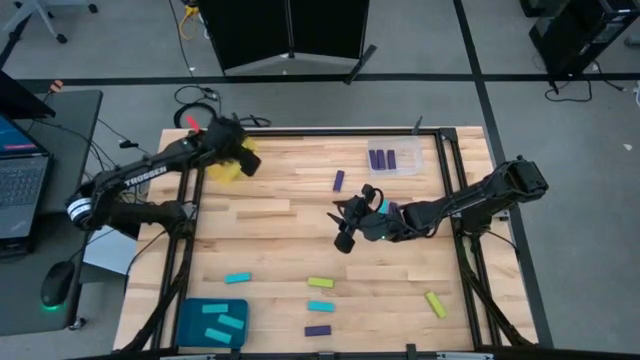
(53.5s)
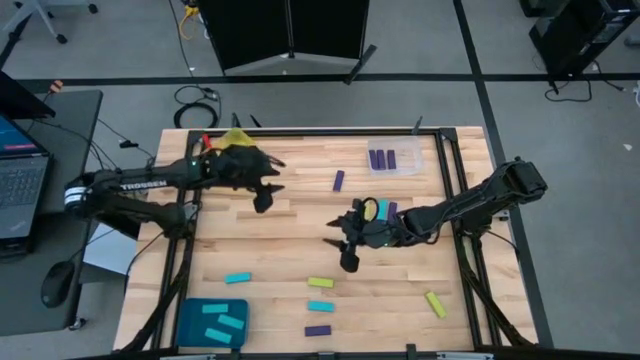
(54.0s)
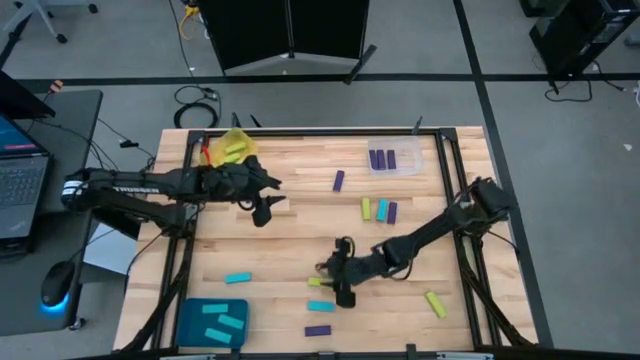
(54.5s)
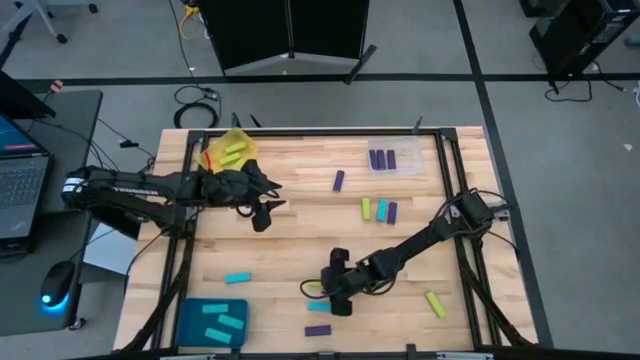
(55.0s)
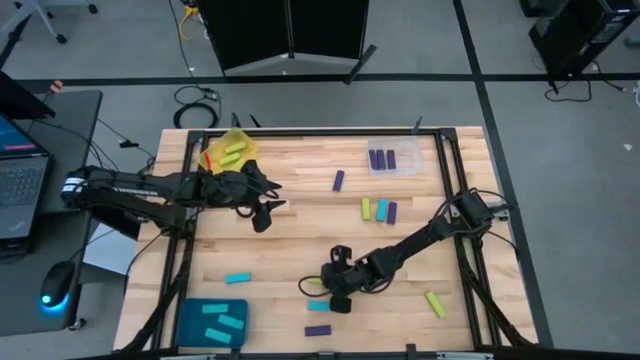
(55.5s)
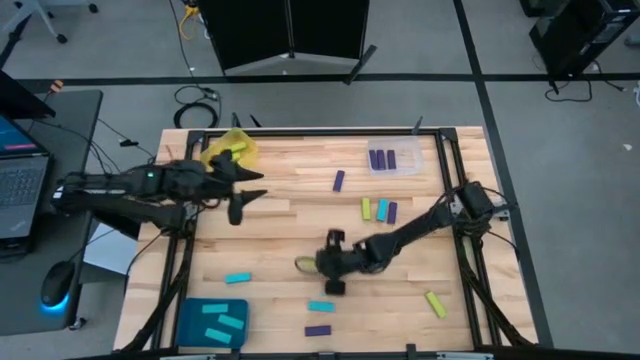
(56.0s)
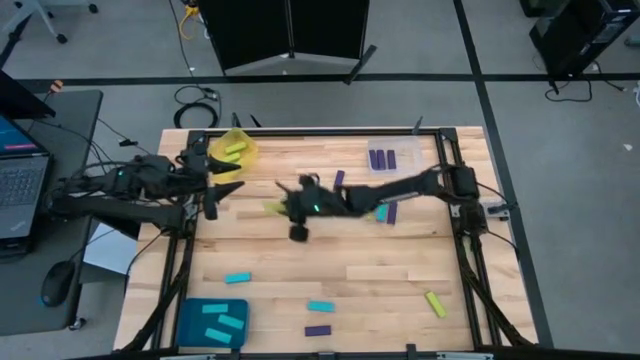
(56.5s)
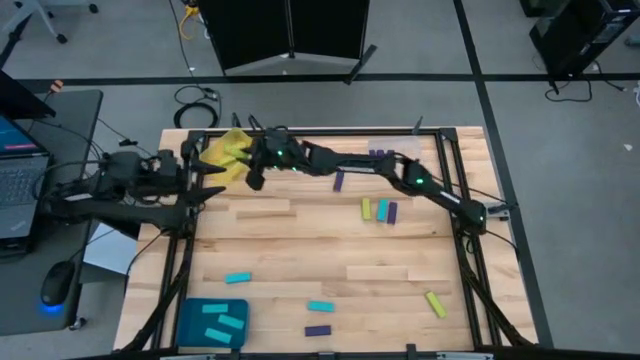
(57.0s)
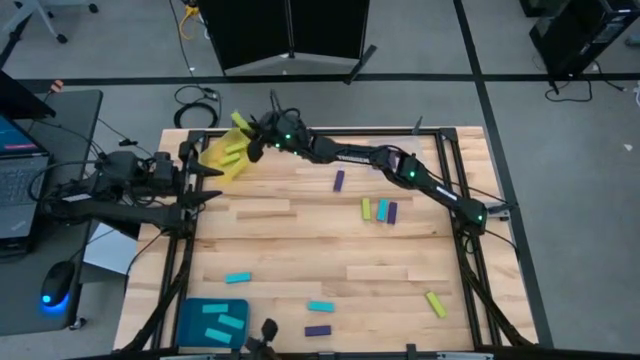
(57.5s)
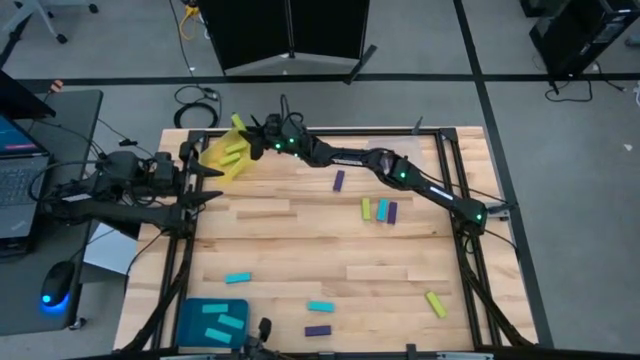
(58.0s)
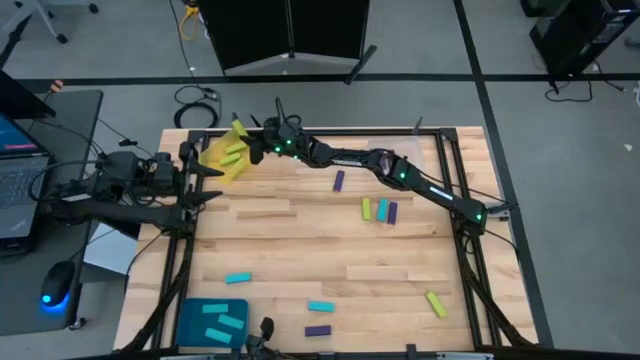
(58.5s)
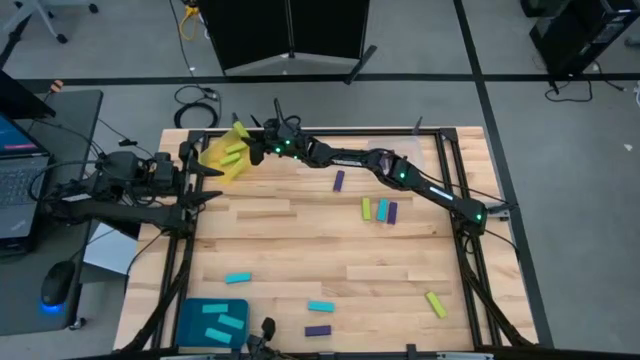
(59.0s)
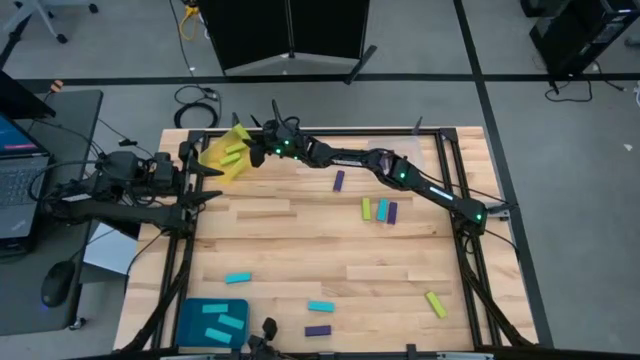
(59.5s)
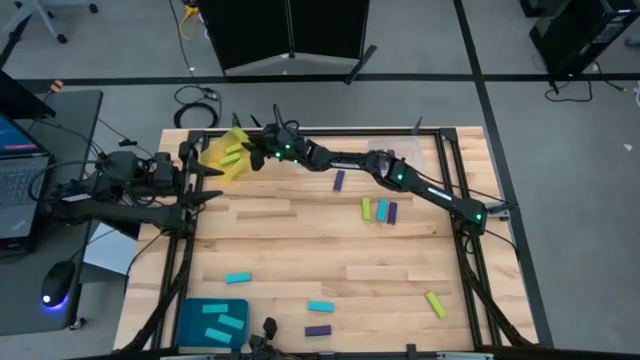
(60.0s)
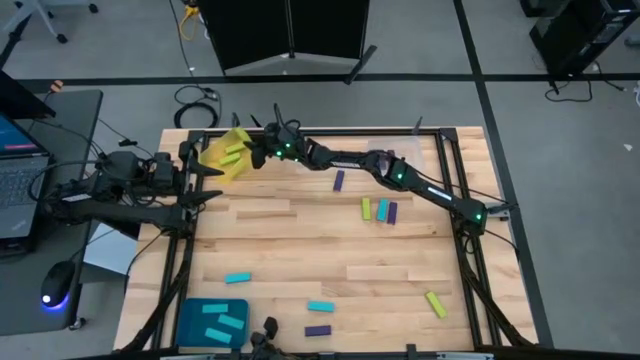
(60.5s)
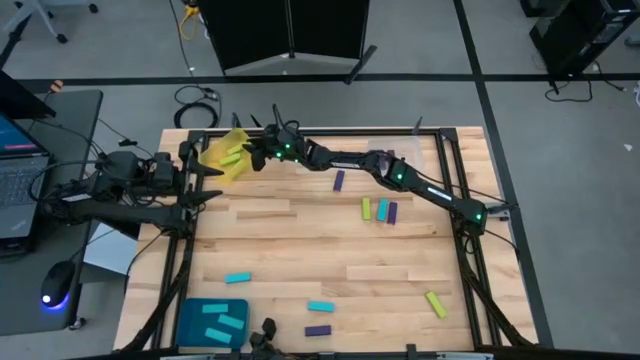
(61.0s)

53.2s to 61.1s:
Task: Sort blocks
Put the light green block into the yellow transparent bin

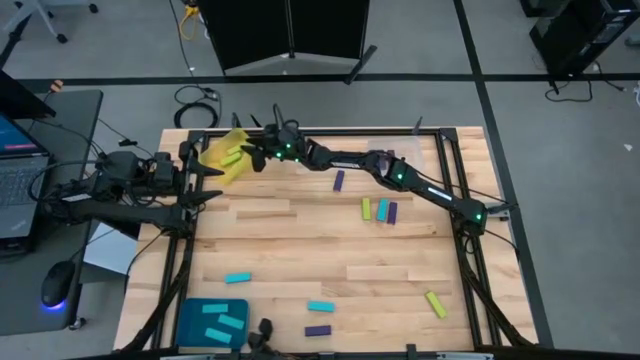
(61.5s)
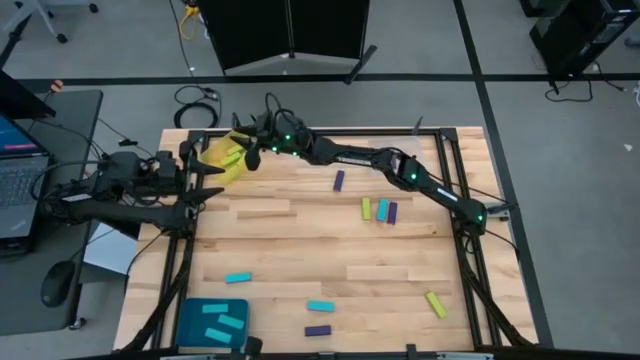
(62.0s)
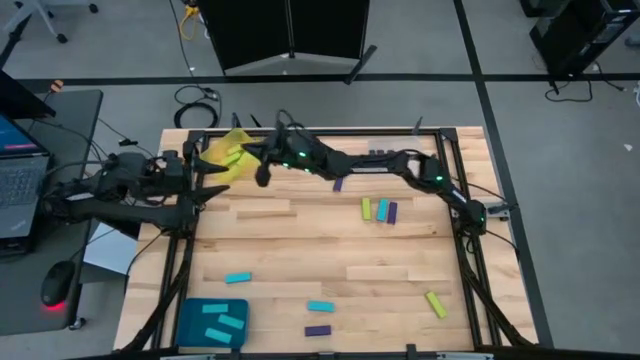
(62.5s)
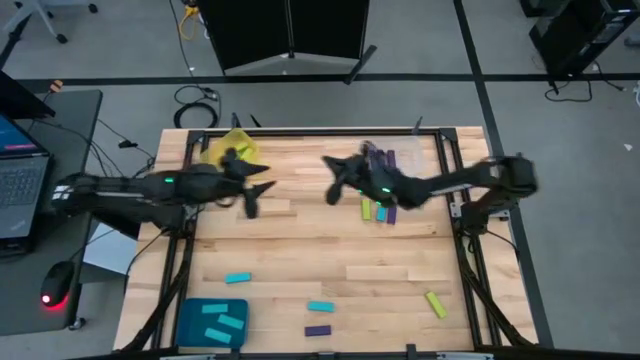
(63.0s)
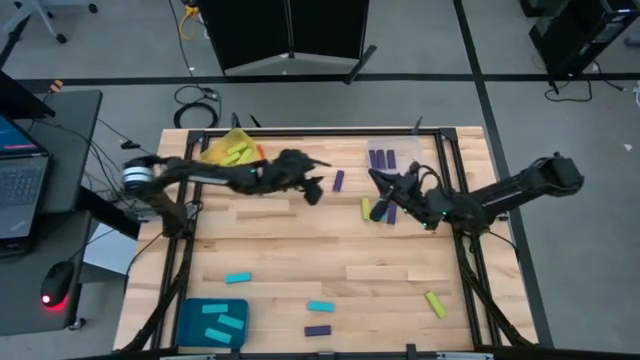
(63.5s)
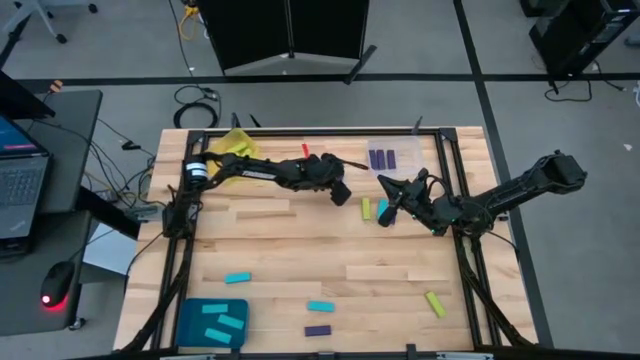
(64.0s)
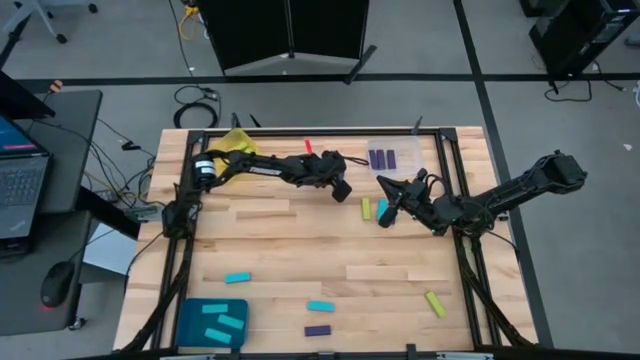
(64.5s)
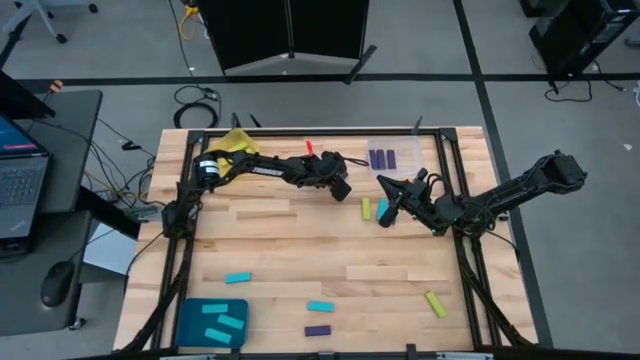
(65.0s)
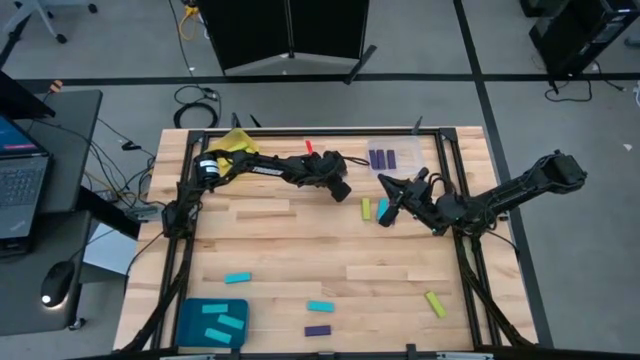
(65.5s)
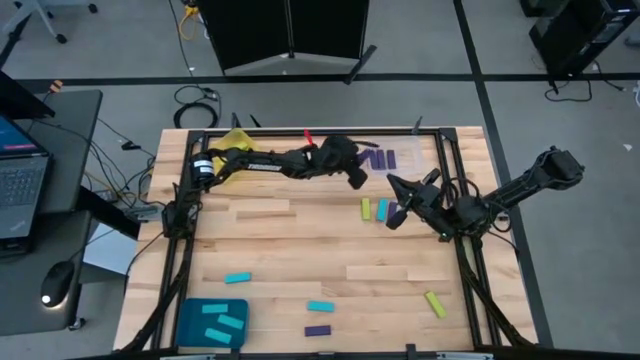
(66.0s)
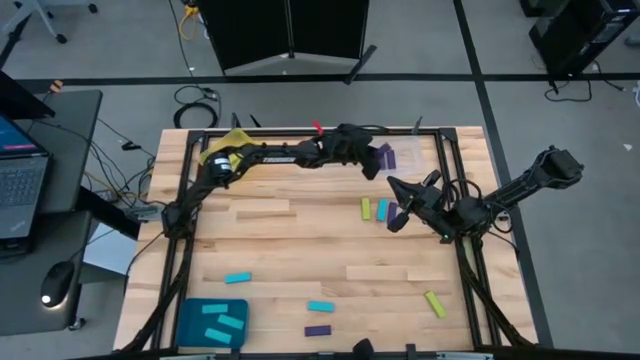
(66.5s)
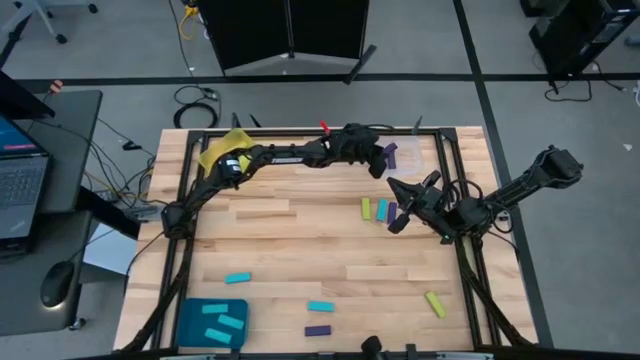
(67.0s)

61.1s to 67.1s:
Put the purple block into the white transparent bin

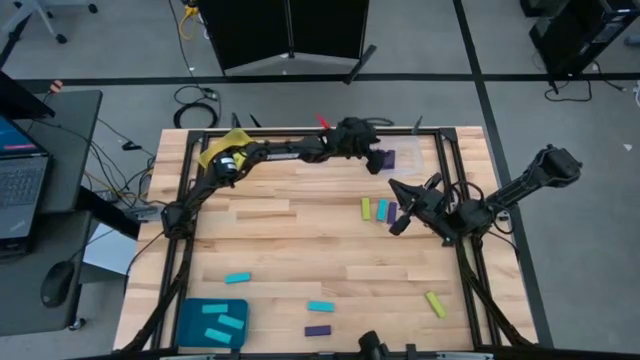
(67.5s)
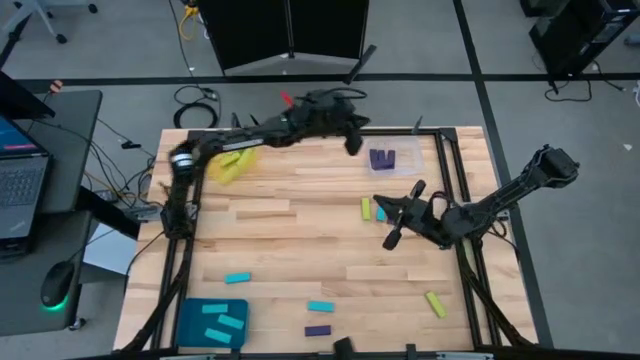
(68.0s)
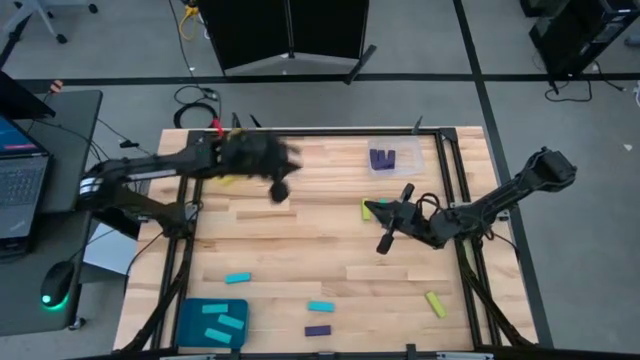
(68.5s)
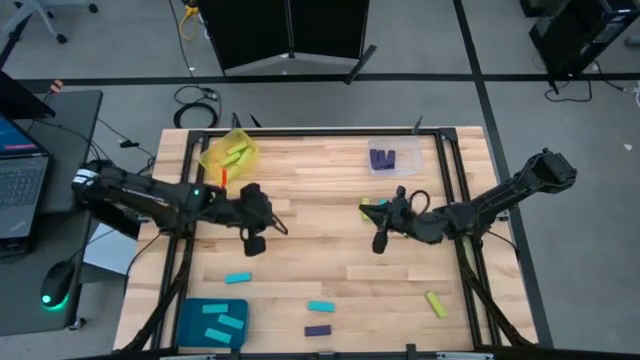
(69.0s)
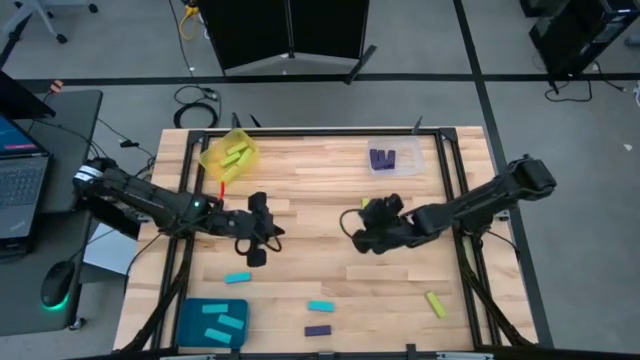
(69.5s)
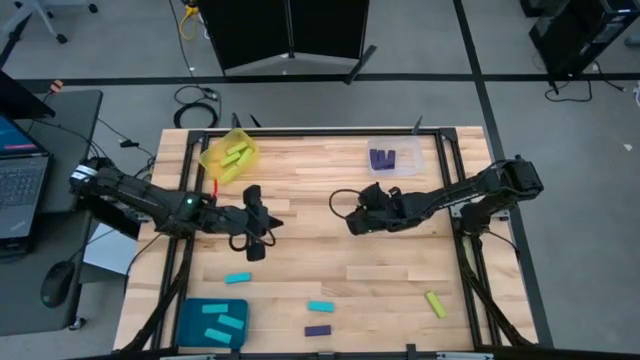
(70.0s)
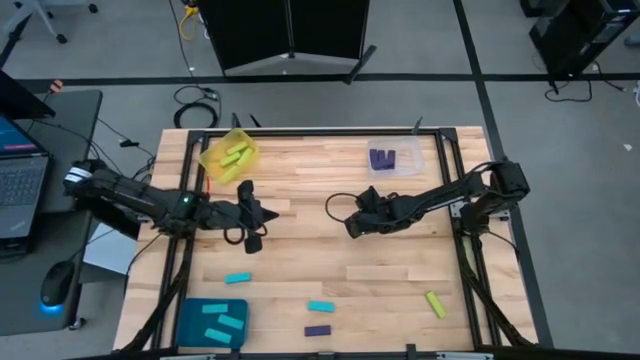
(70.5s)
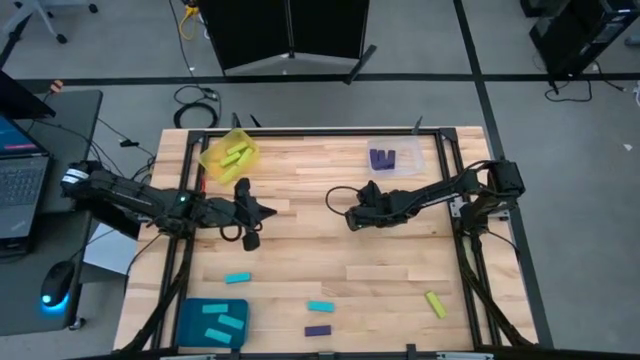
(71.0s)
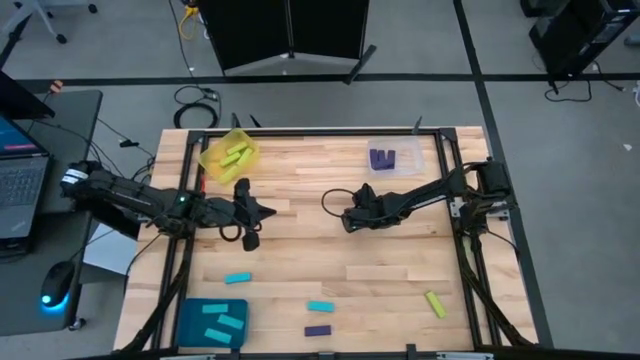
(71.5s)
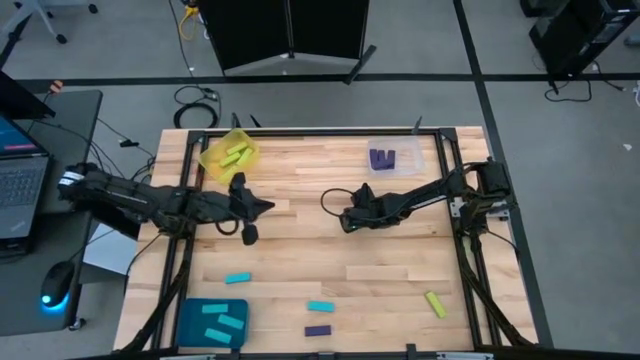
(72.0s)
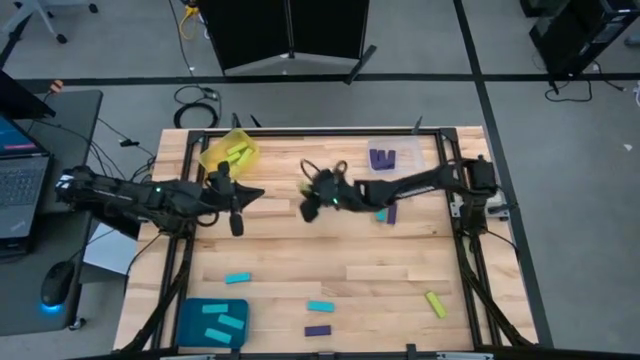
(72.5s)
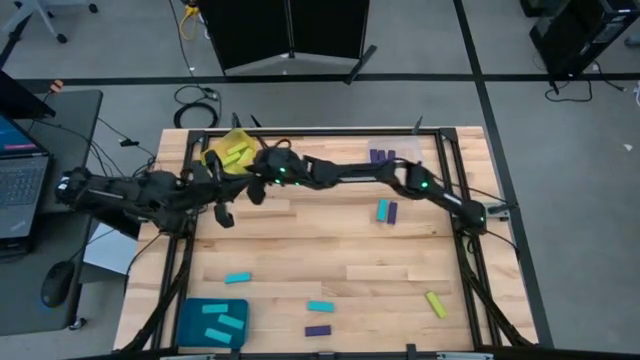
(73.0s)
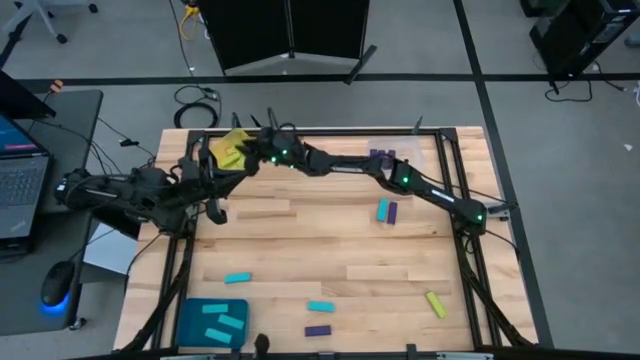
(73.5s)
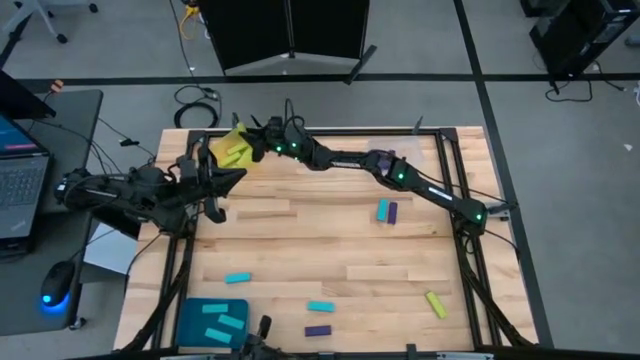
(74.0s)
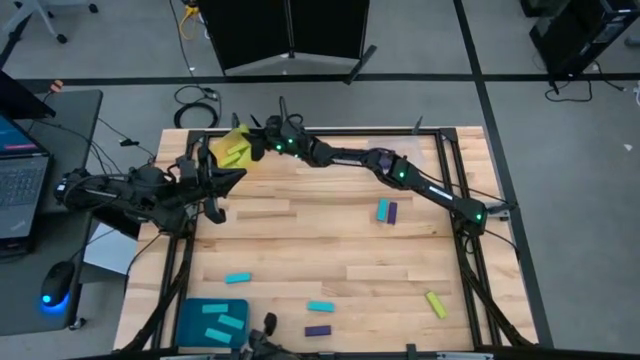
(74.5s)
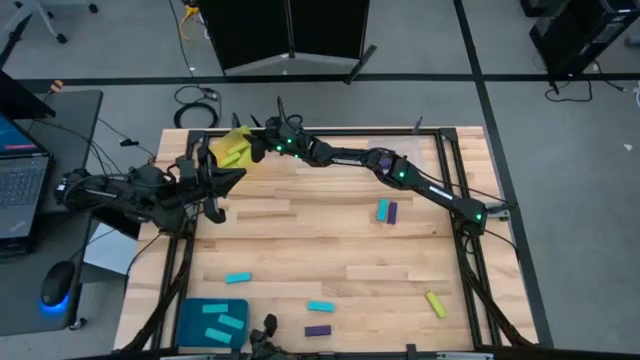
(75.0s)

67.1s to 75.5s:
Put the light green block into the yellow transparent bin
